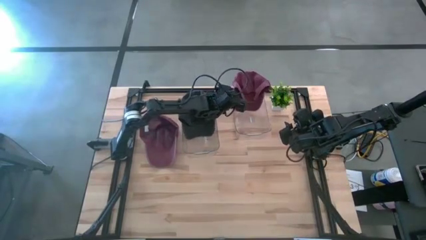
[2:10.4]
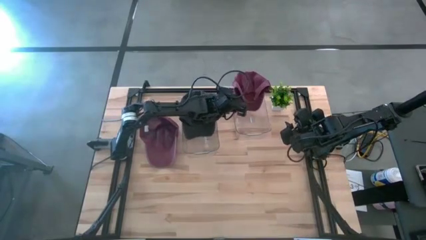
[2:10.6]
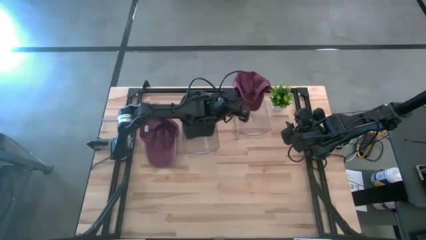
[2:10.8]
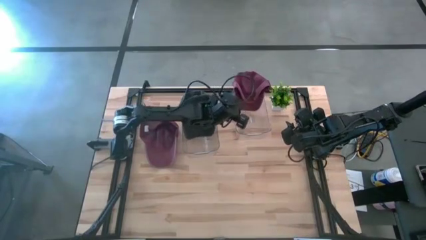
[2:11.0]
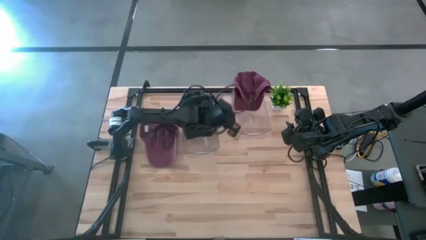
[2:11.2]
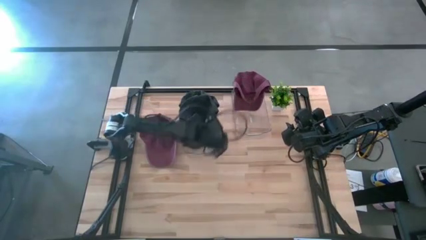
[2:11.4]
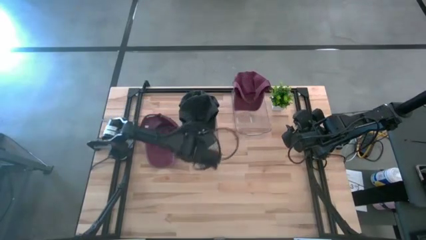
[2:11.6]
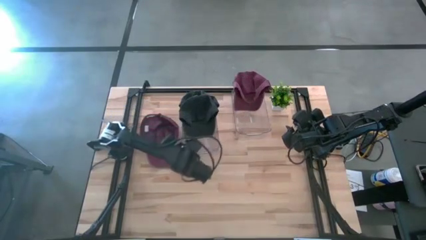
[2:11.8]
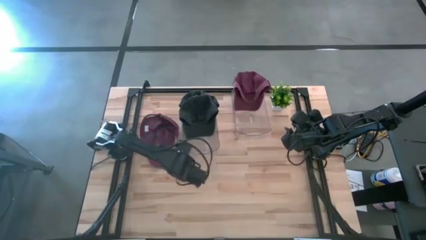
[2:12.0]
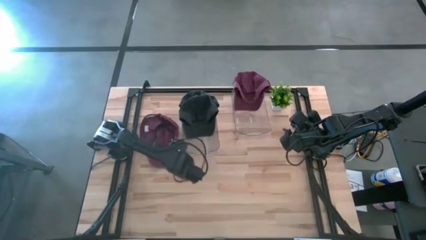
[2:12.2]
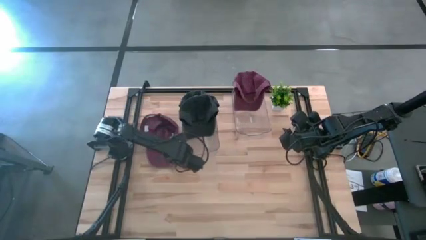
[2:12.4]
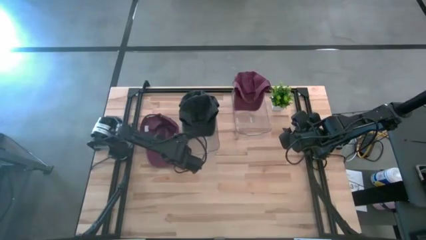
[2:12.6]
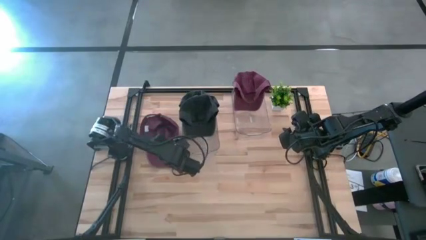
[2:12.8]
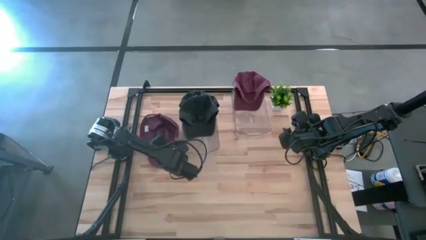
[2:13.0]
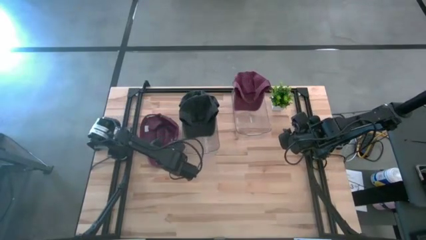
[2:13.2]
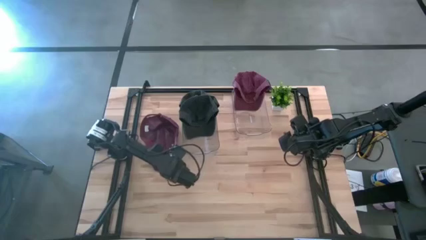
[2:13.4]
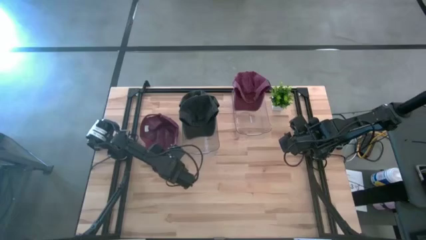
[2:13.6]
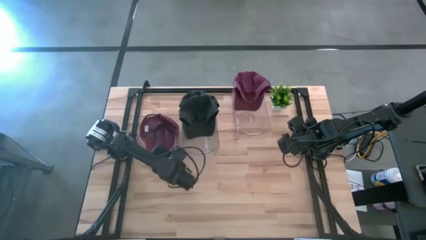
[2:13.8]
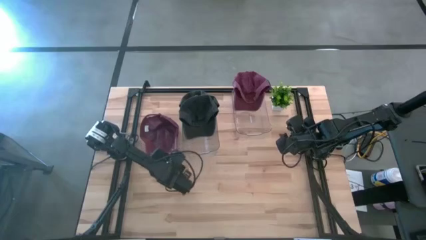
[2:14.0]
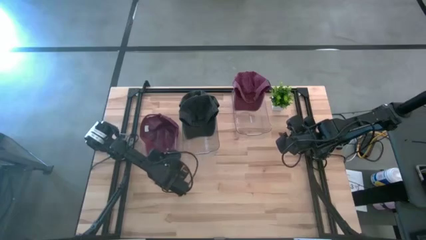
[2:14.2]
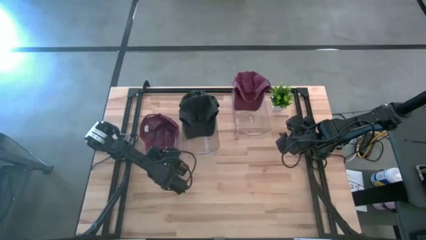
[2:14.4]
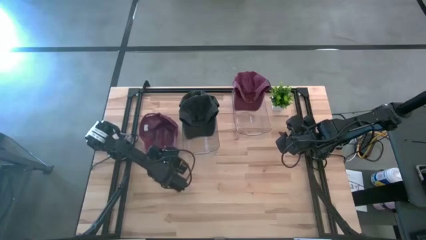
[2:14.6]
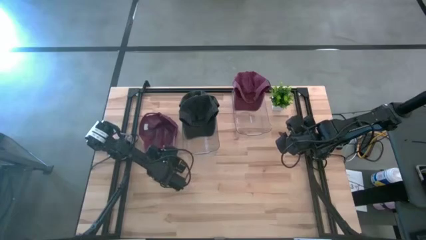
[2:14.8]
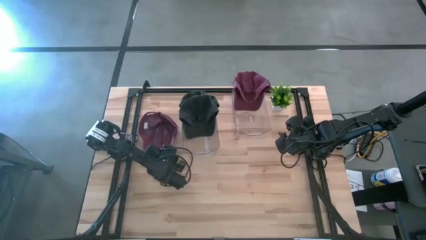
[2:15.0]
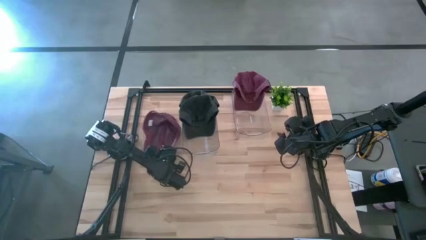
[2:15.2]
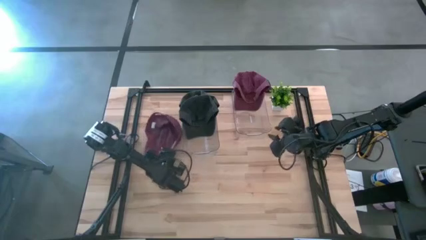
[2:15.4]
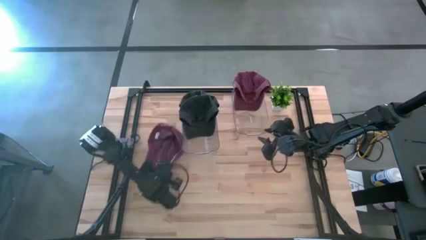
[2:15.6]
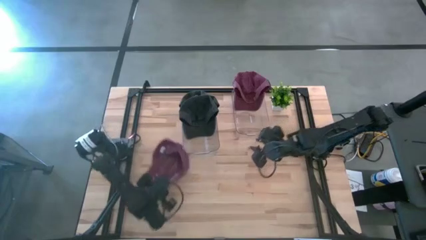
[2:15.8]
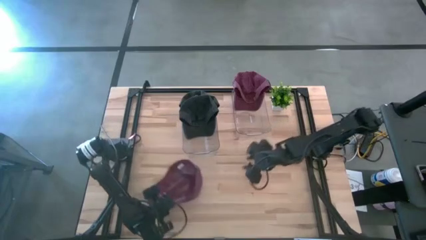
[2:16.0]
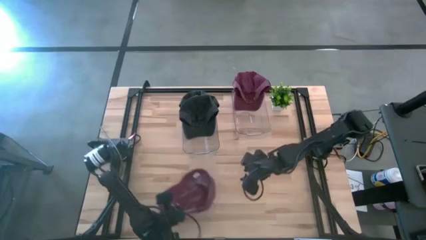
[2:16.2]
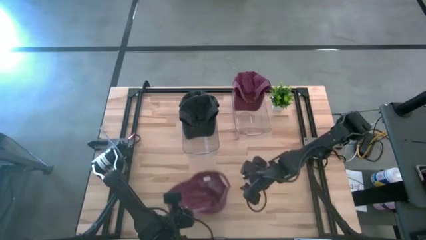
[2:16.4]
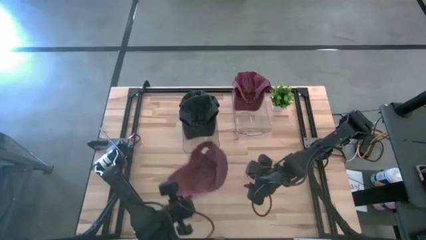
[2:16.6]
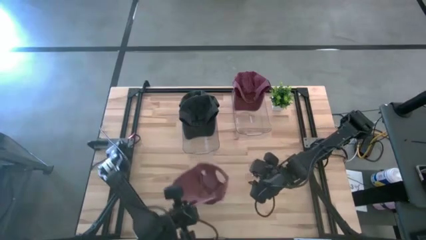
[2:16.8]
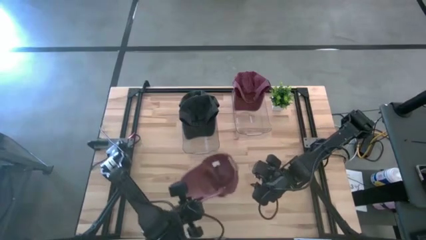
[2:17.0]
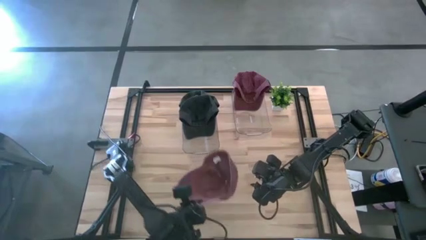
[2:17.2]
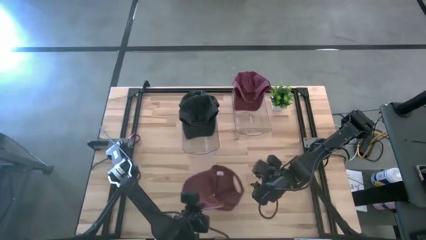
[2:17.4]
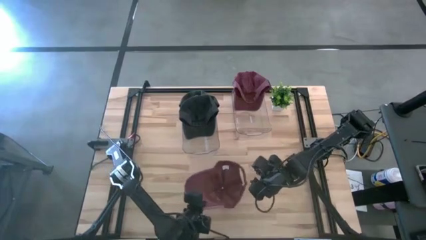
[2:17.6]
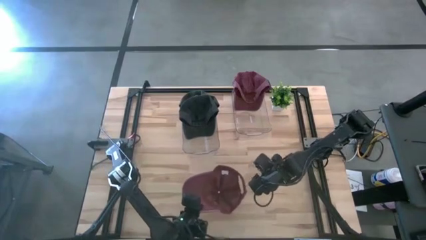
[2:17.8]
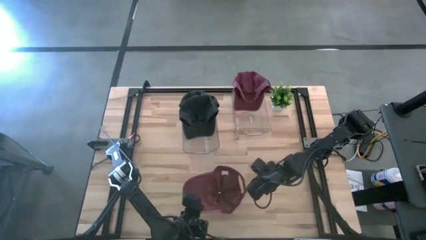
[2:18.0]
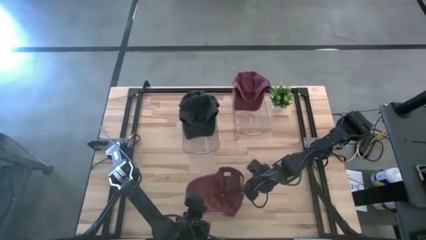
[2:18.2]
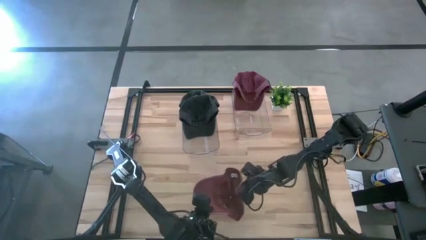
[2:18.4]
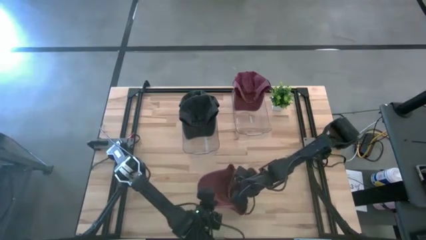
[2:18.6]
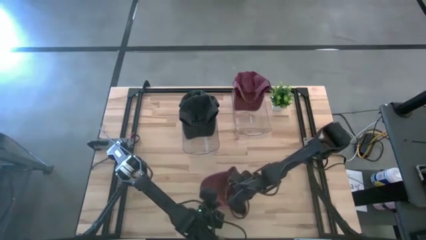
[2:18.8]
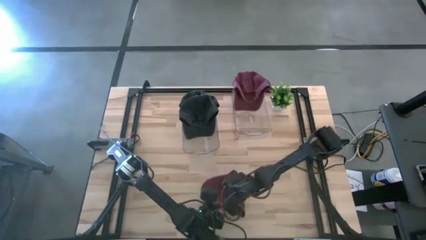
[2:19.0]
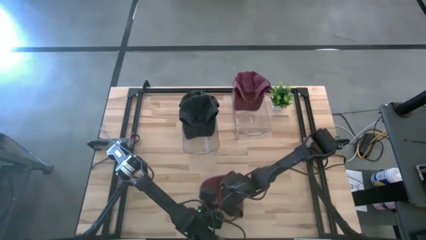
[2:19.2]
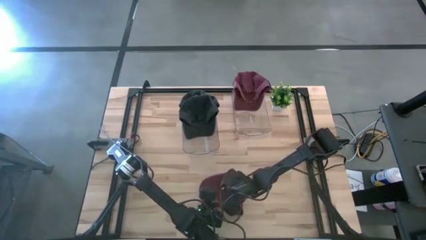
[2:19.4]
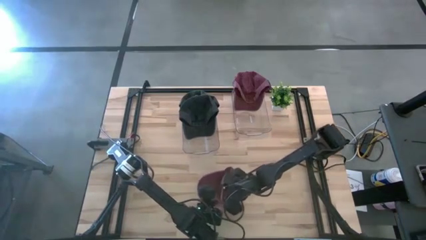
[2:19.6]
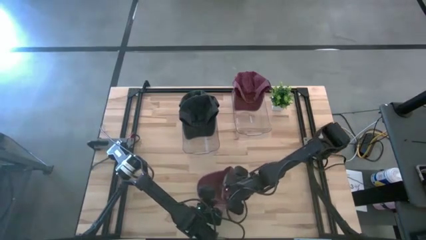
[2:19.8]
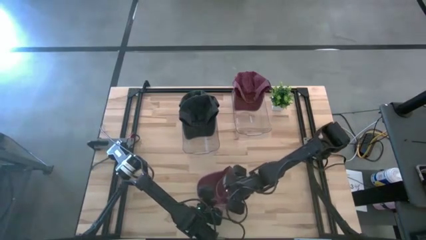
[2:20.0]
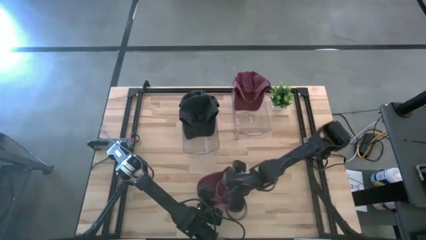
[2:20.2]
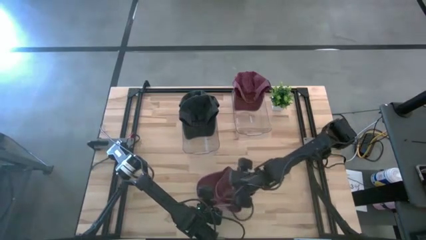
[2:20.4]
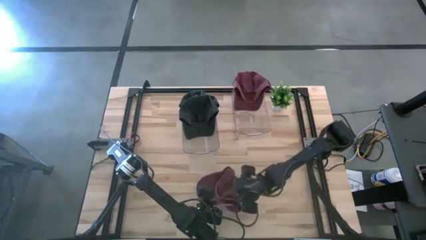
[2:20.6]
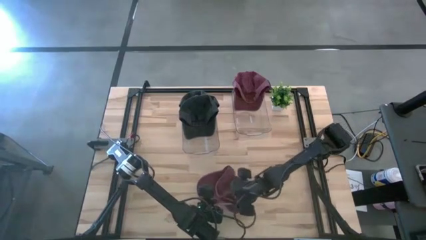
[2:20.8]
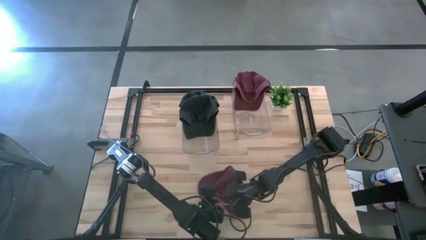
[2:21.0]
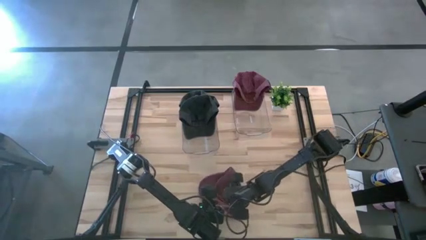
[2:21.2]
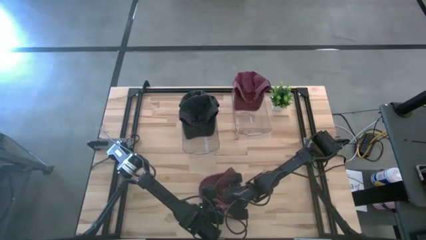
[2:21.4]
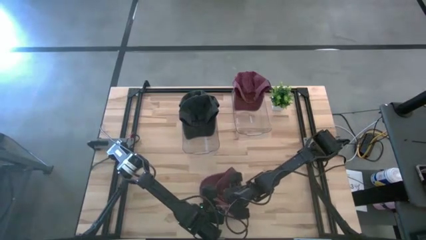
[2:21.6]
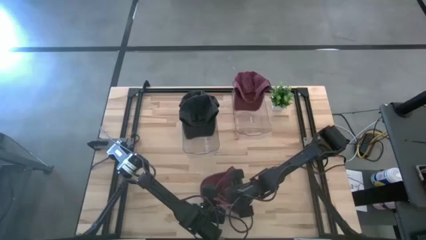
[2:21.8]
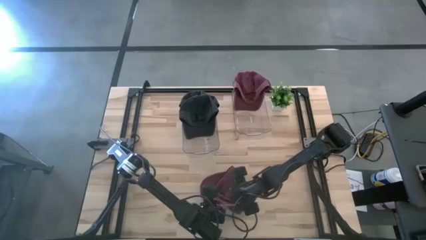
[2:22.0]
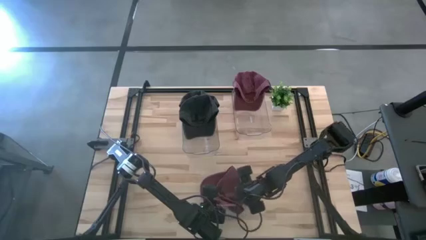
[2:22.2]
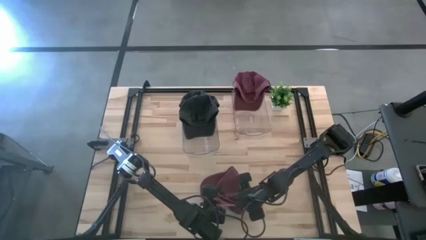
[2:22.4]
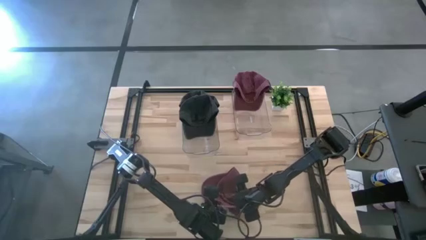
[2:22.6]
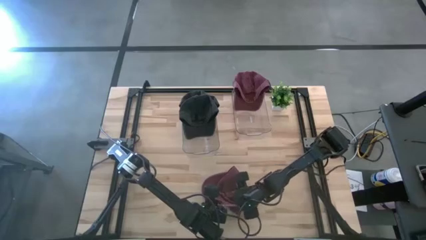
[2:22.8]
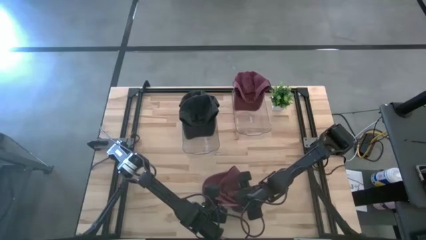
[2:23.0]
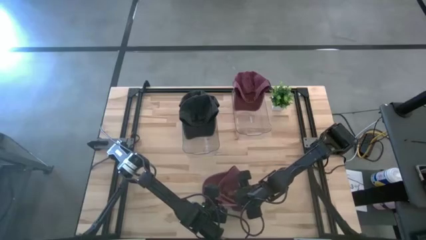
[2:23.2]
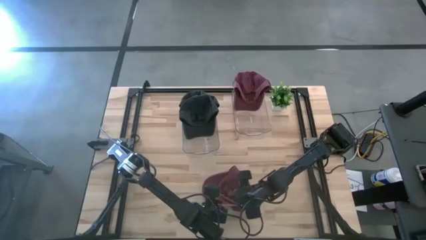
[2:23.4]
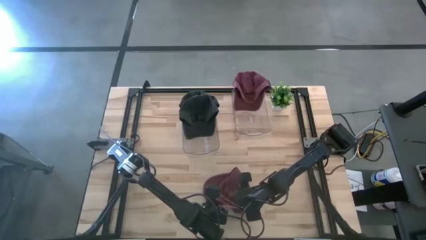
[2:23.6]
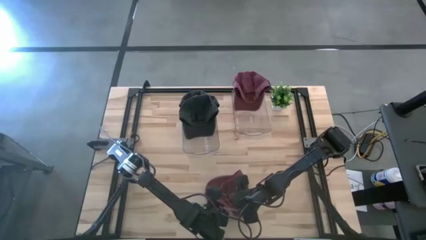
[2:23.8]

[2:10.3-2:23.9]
Task: Pick & Place hat
Put the red cap into the right transparent bin

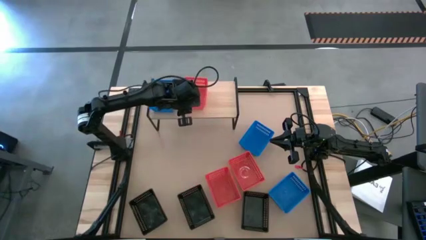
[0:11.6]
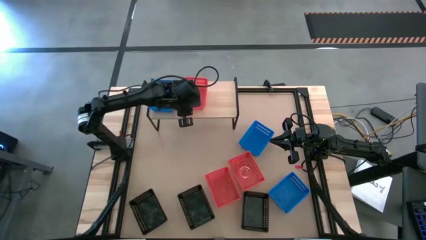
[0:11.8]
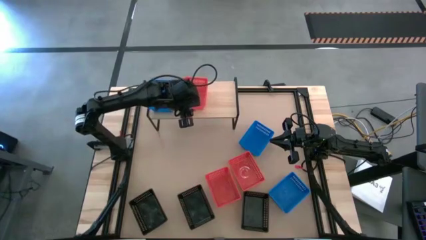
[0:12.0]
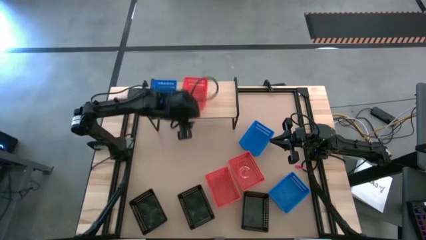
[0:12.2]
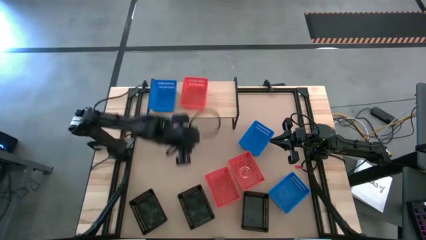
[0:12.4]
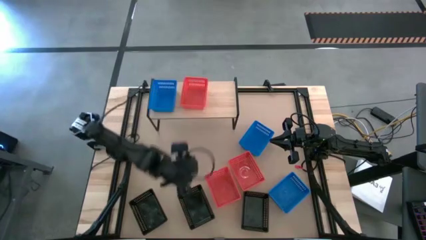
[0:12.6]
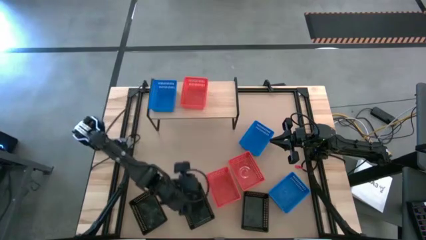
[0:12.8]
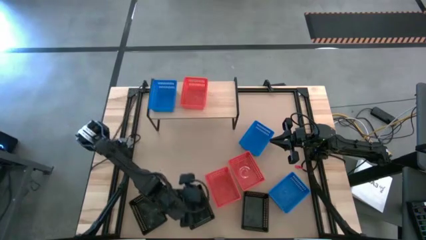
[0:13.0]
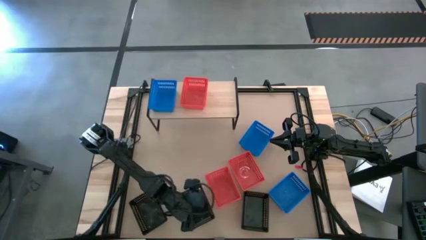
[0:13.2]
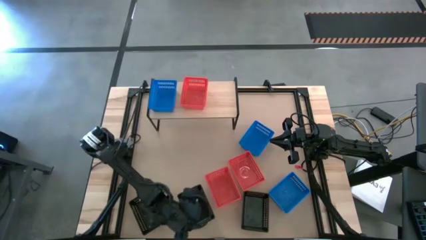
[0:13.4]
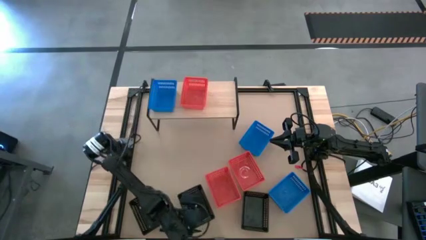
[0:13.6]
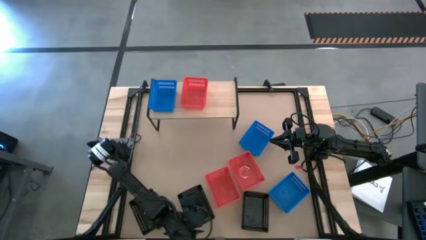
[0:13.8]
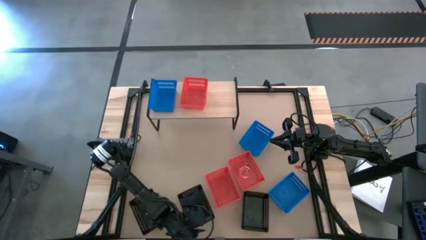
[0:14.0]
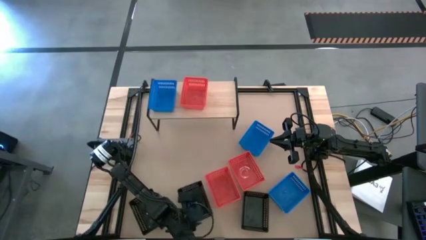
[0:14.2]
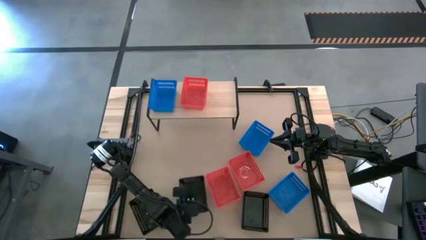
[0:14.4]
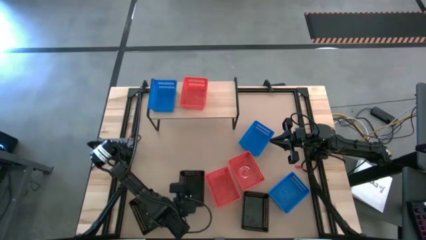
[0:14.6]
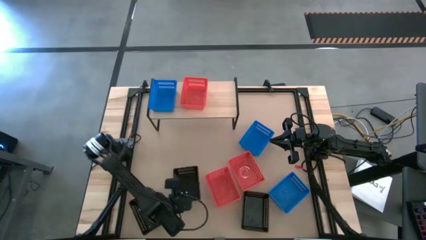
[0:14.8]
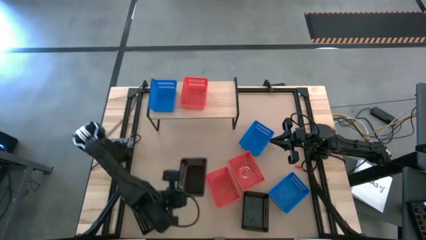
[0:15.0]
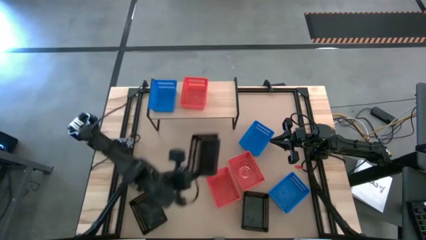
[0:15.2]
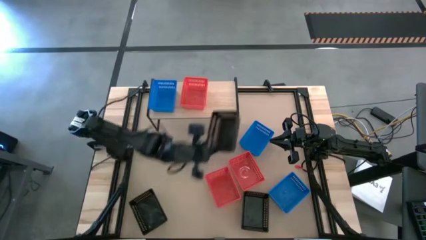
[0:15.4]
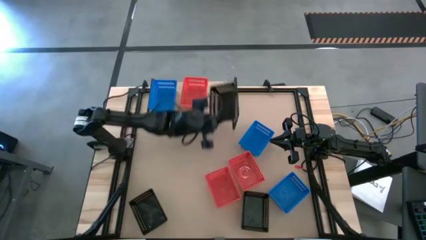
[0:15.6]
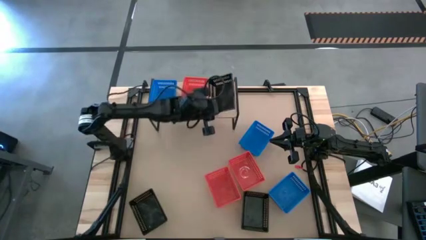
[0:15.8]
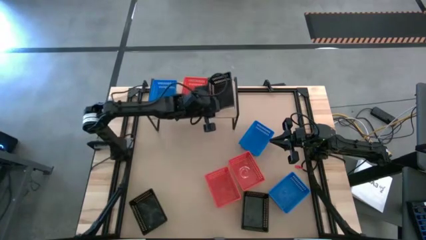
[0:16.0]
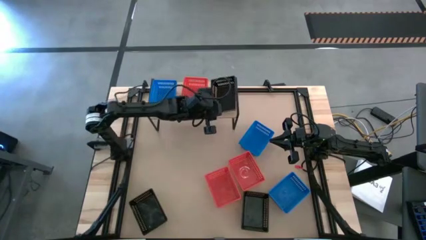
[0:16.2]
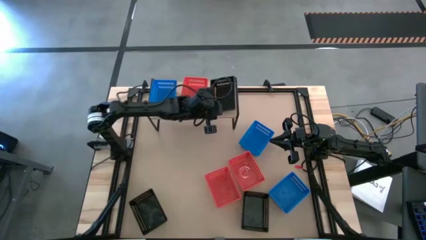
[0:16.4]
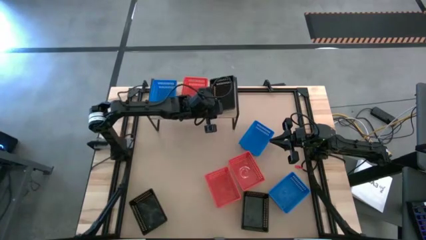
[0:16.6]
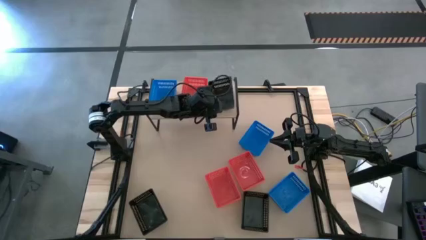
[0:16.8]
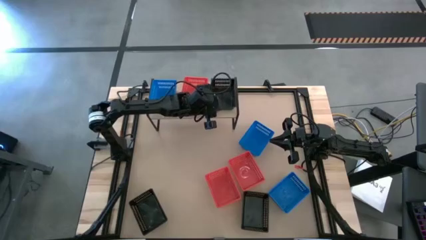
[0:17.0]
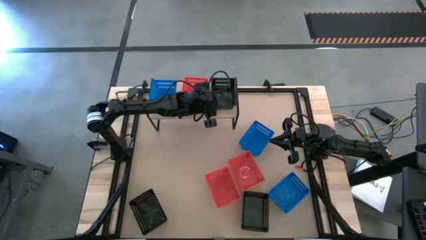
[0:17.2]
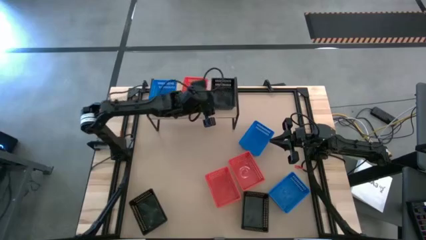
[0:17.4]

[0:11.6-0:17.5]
Task: Stack baskets on shelf by color
Put the middle black bin on the shelf
